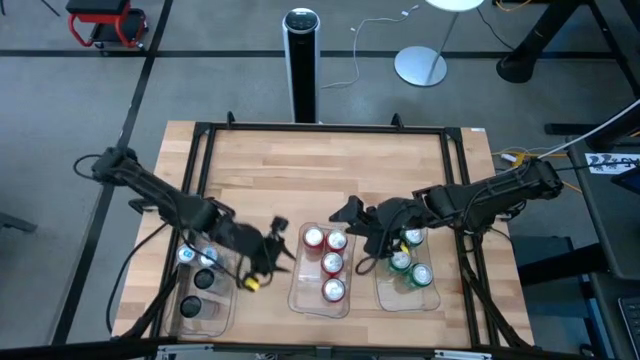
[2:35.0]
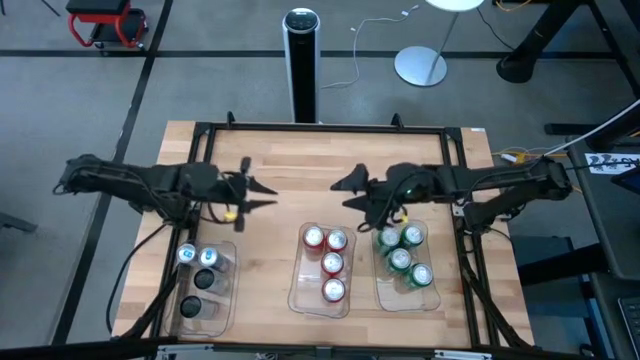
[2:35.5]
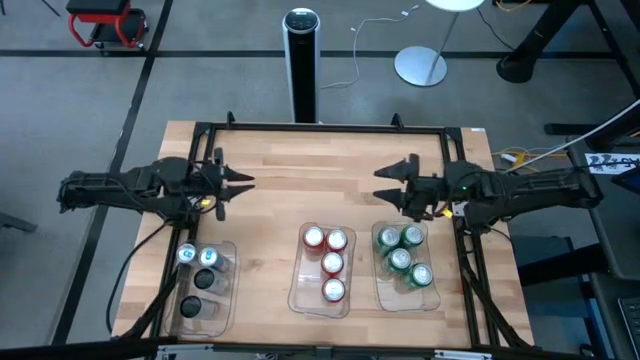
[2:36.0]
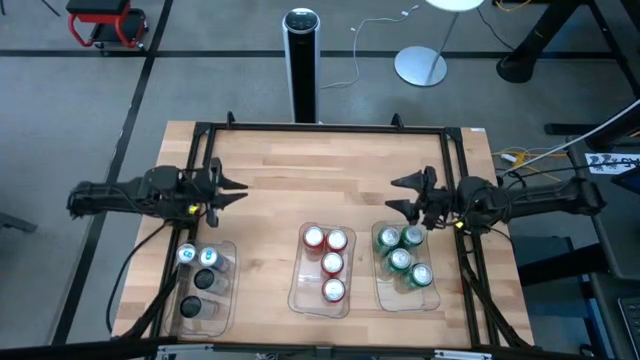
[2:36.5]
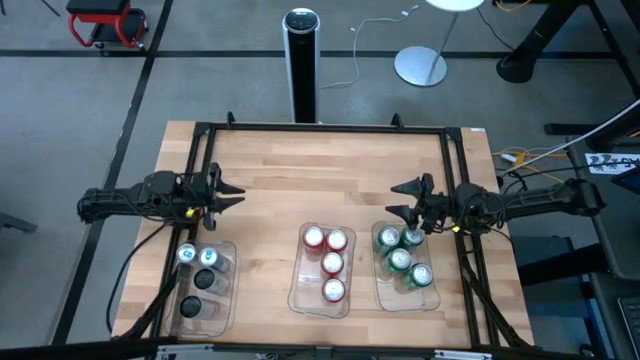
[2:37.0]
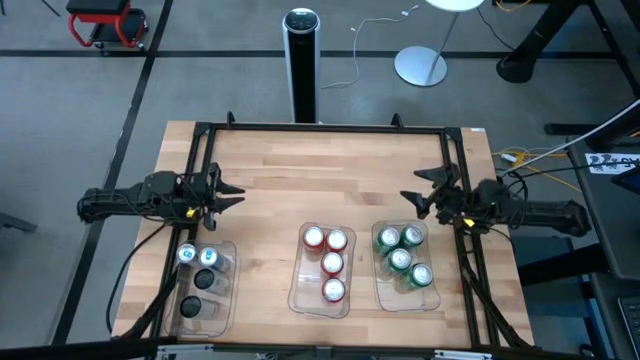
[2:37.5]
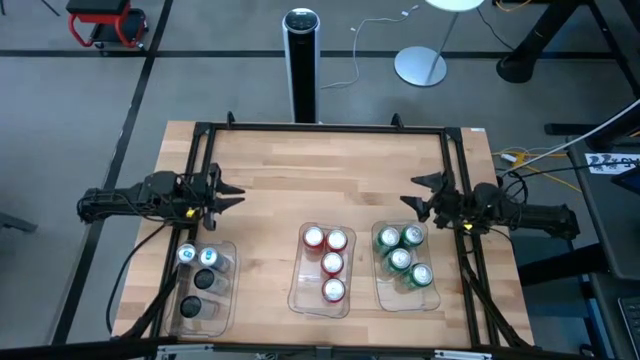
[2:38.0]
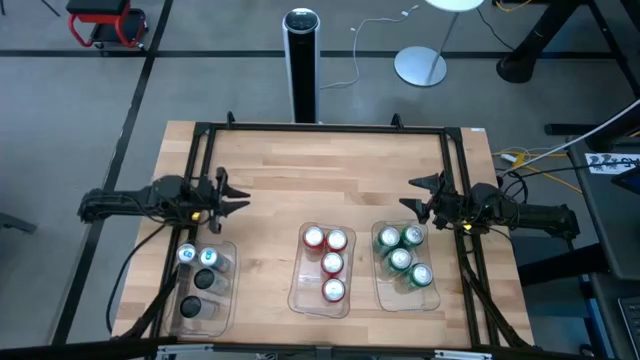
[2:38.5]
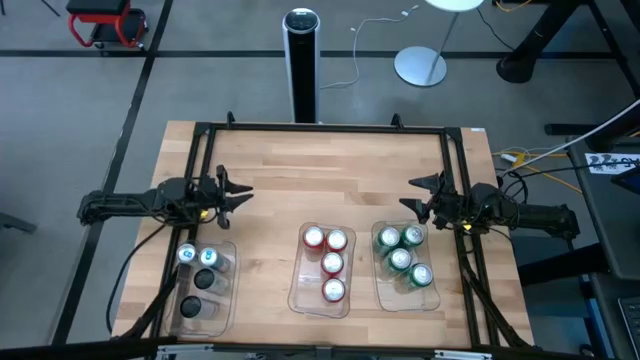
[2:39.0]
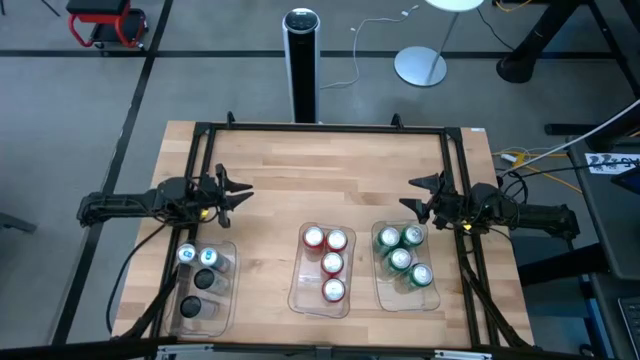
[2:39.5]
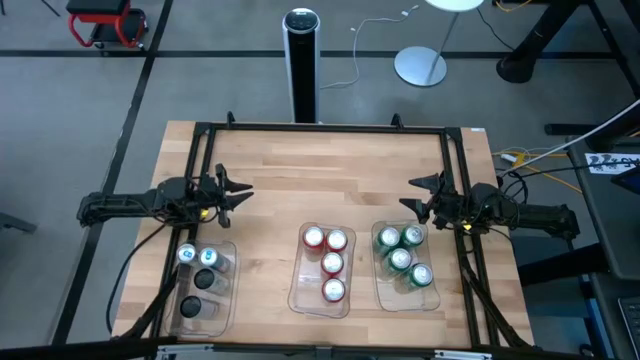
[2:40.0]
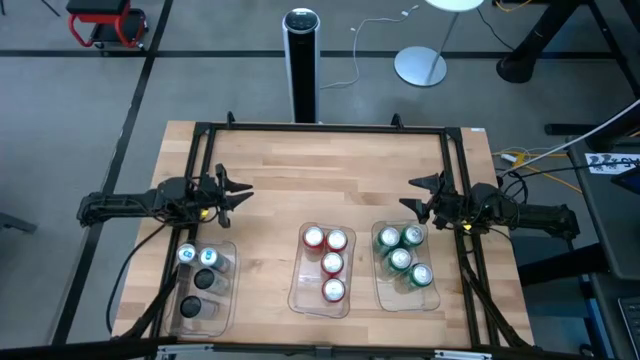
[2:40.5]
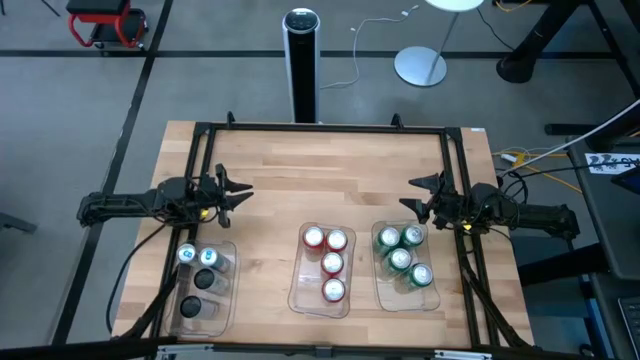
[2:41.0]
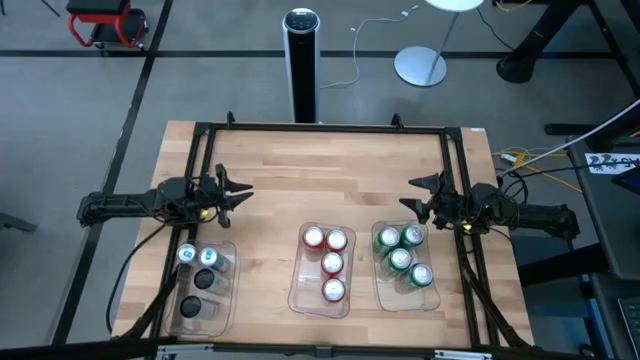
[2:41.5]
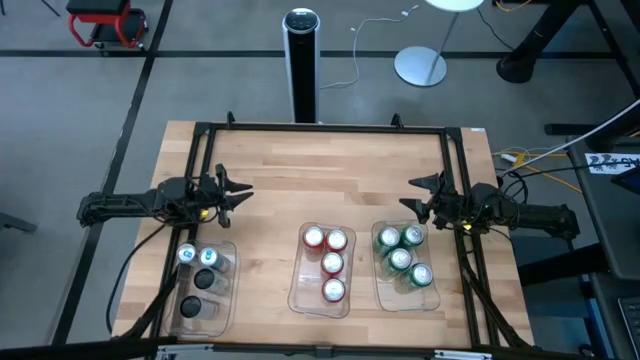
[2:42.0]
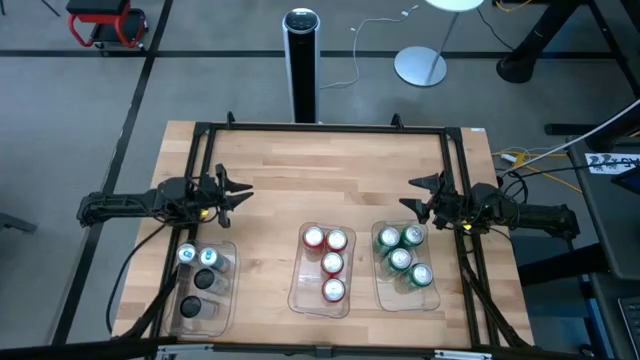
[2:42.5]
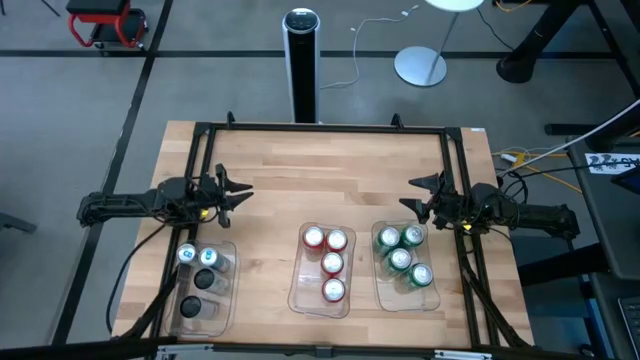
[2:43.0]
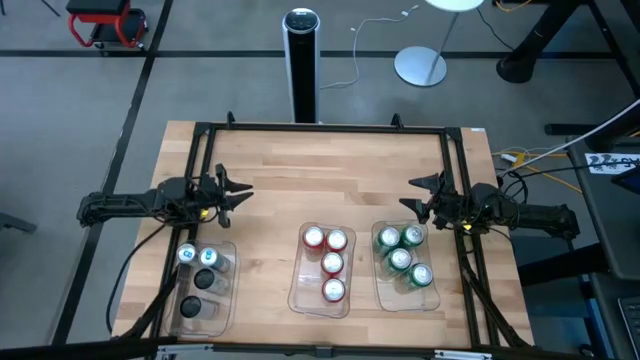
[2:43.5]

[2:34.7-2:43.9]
Task: Sort soda cans
Return to Home Position

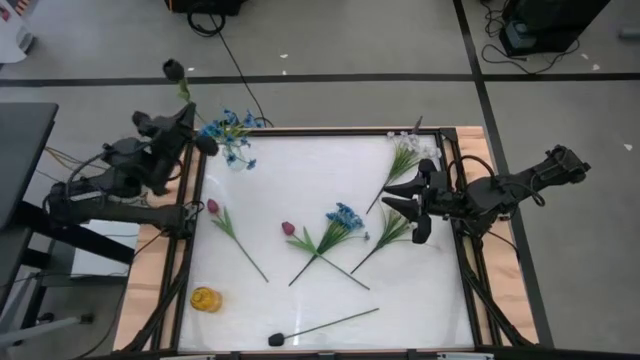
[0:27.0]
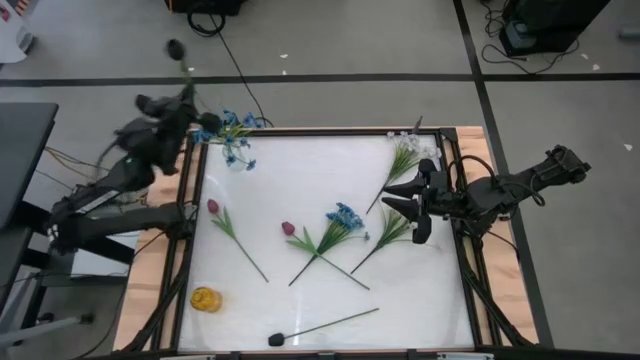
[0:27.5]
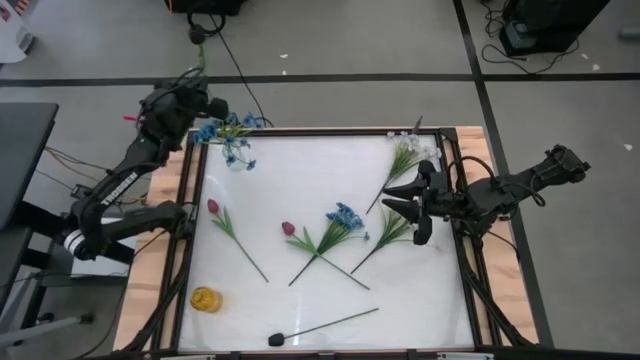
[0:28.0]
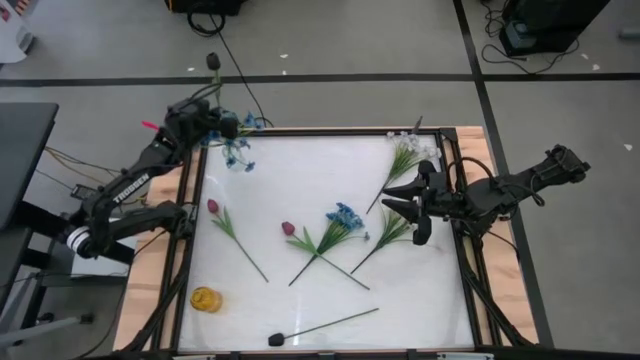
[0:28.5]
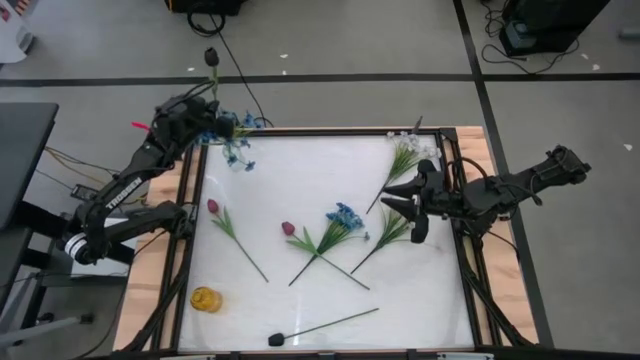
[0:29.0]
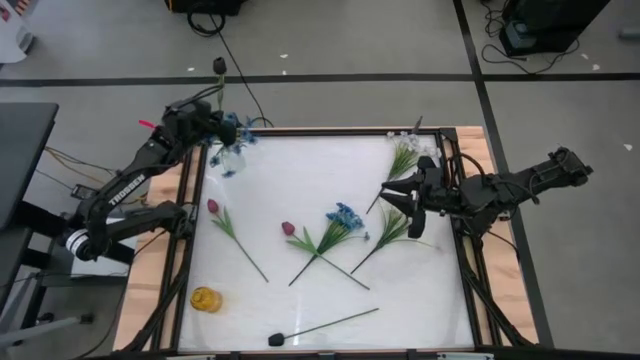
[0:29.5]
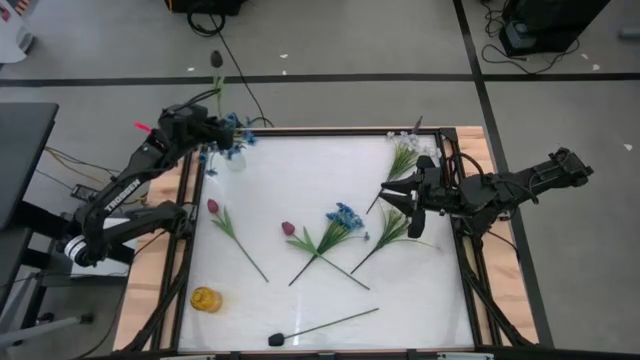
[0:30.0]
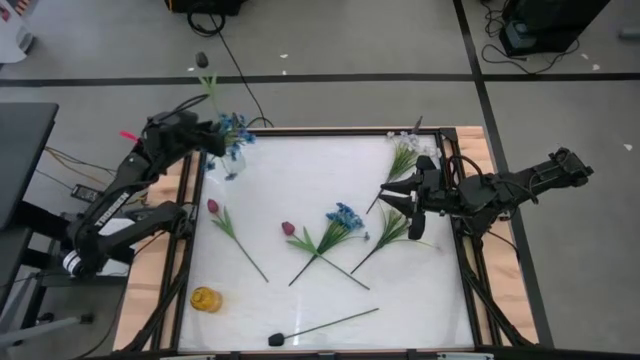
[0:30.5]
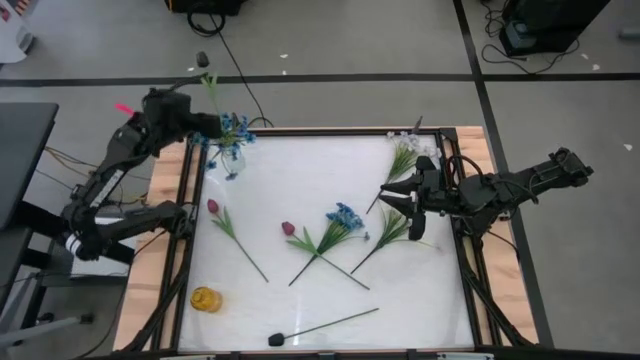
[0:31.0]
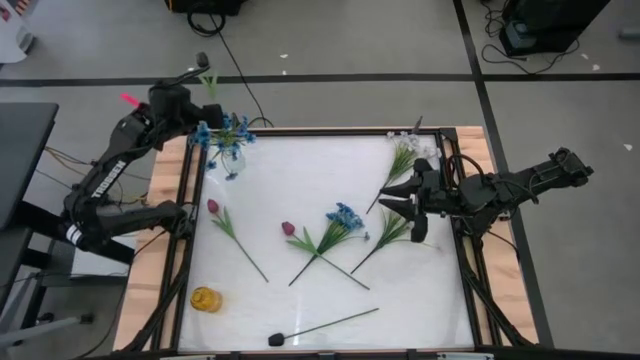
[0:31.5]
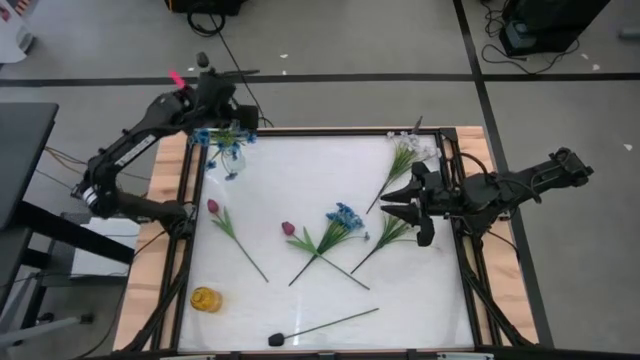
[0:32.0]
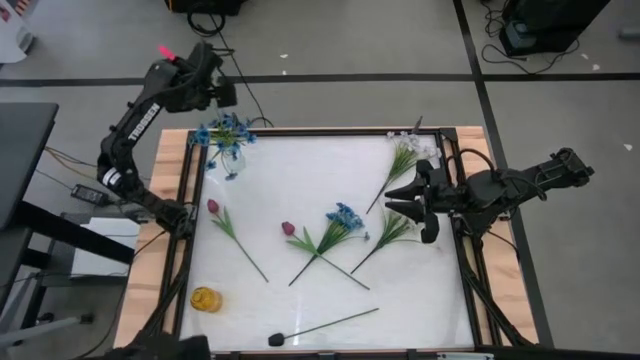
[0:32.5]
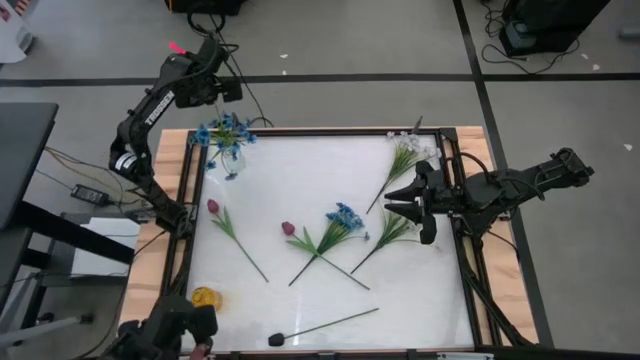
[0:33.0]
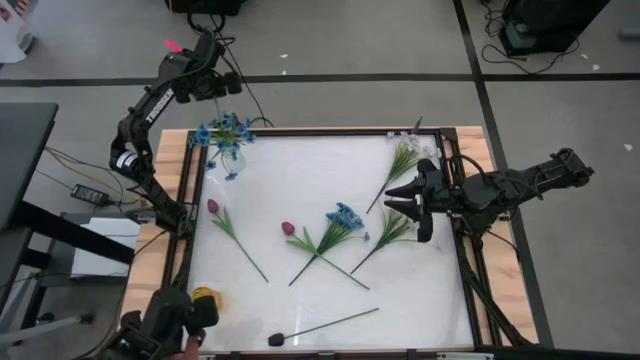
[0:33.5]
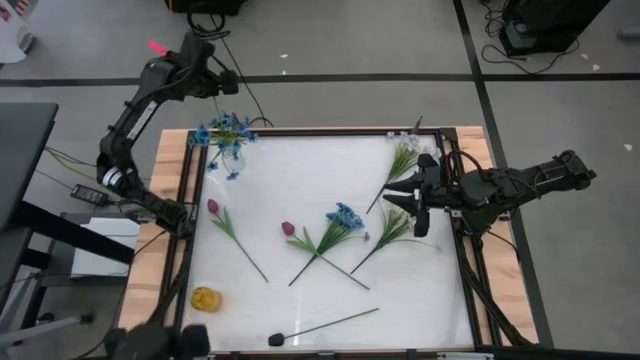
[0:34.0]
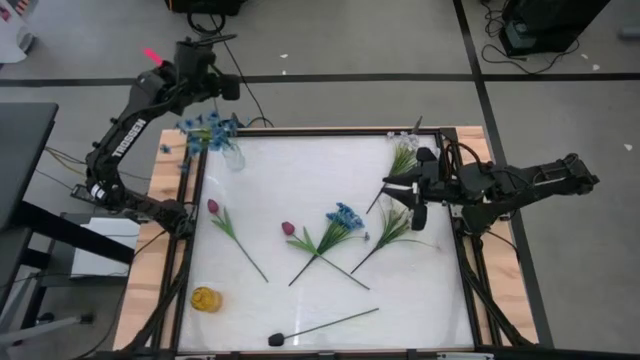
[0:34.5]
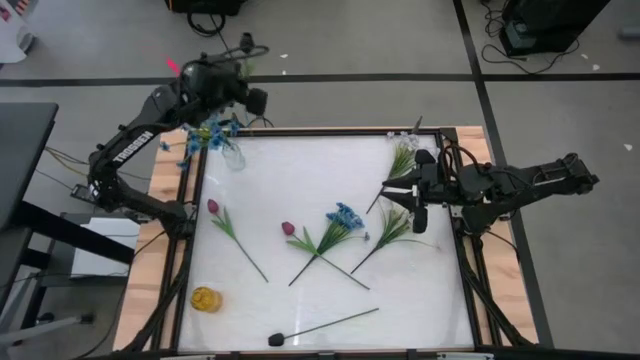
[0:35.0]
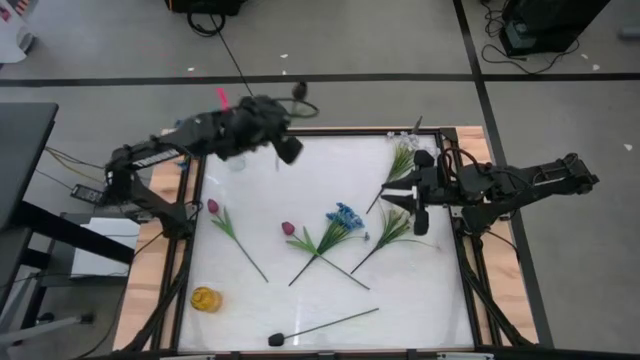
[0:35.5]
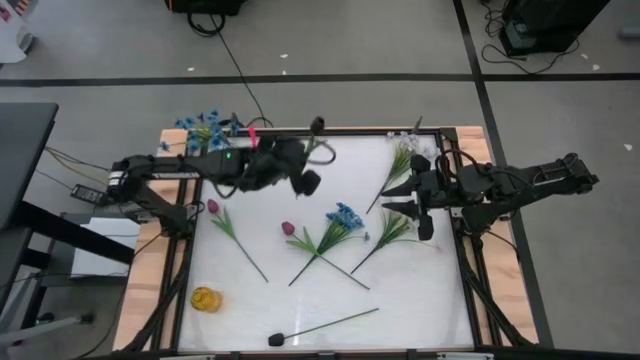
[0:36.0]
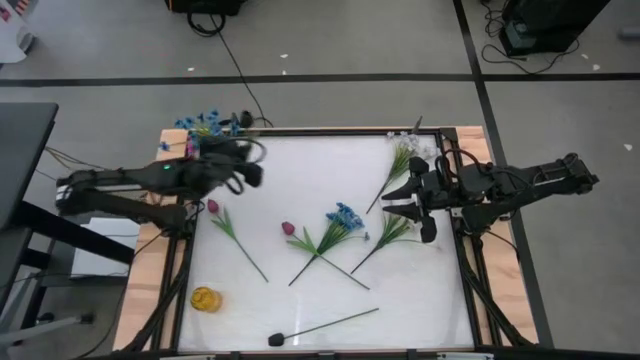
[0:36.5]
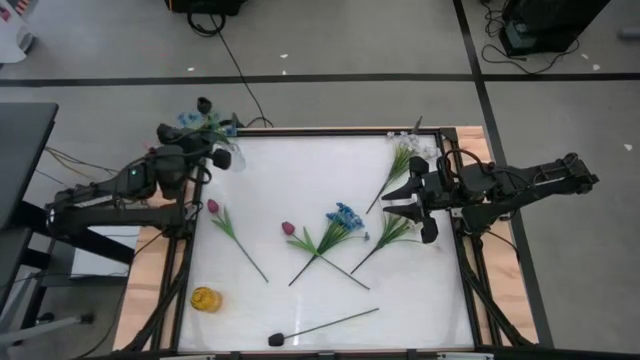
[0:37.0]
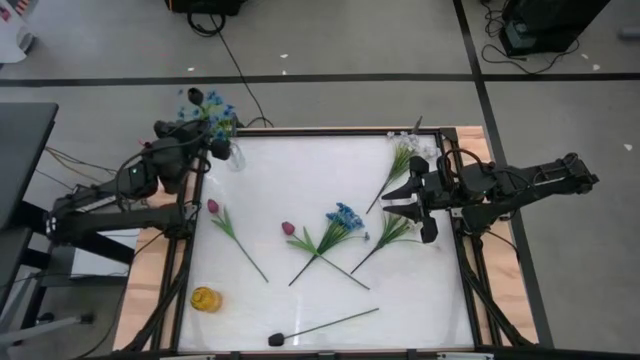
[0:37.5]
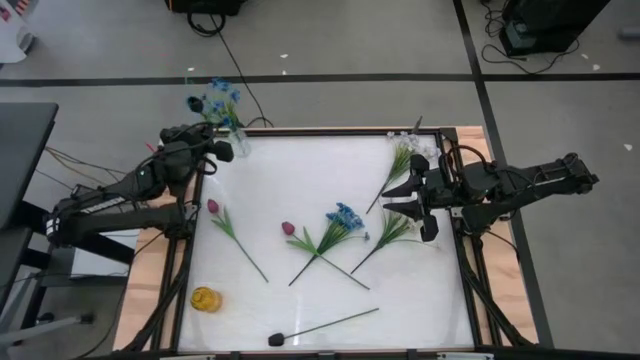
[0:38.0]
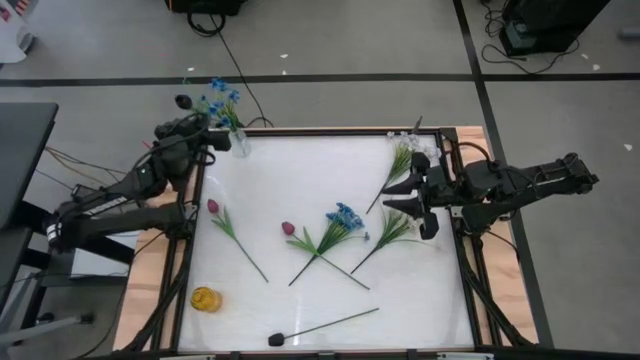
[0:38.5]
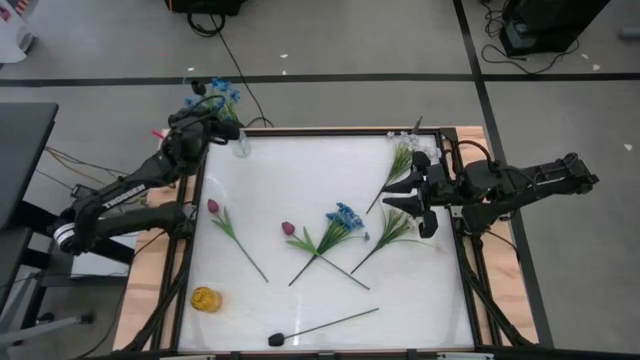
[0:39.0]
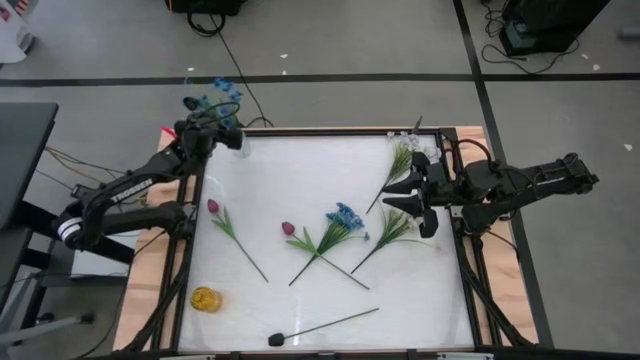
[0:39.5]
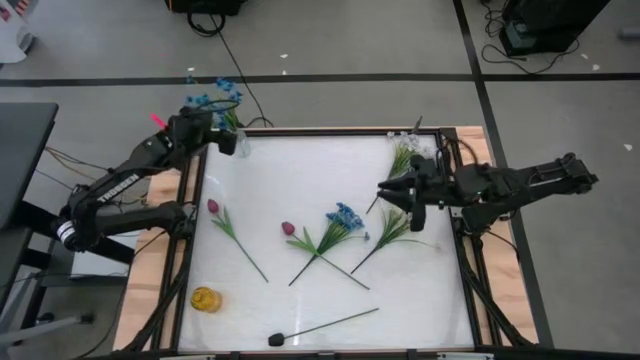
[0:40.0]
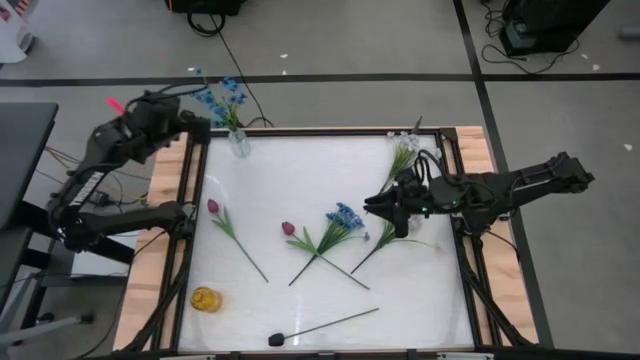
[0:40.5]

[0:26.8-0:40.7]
Task: Sort flowers into vase by color
Put the right black tulip into the transparent vase
